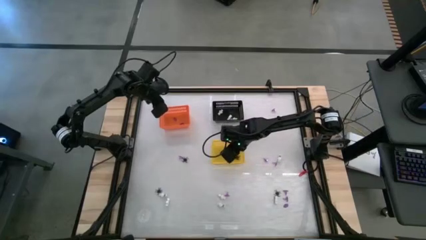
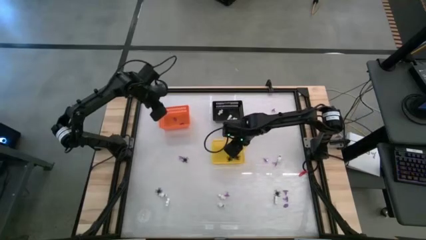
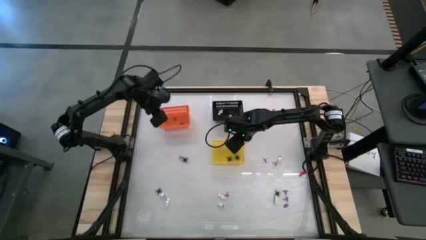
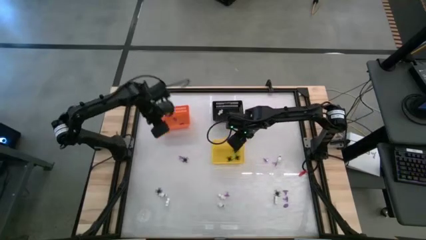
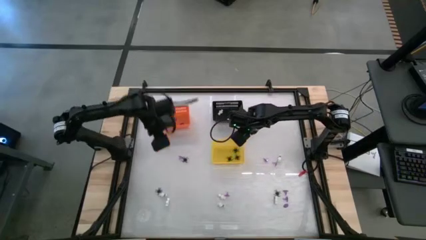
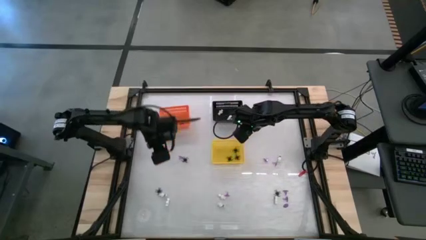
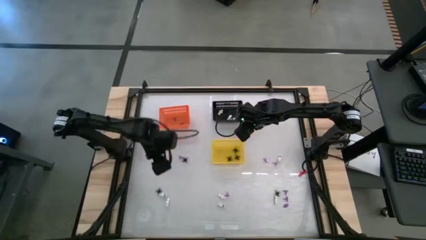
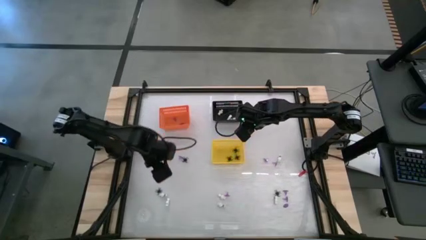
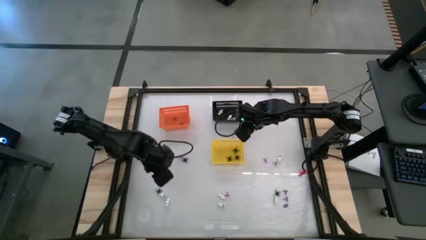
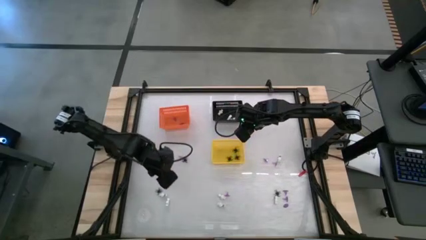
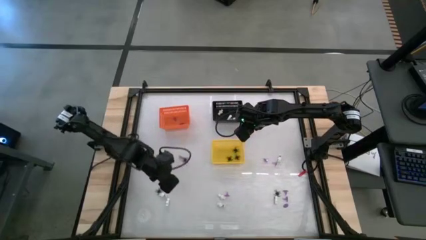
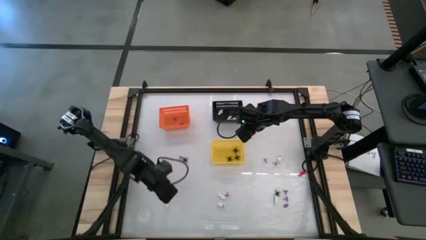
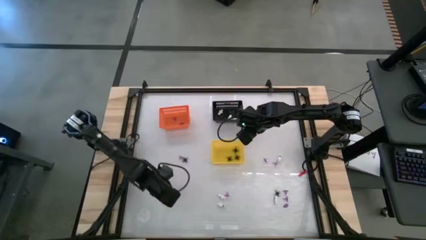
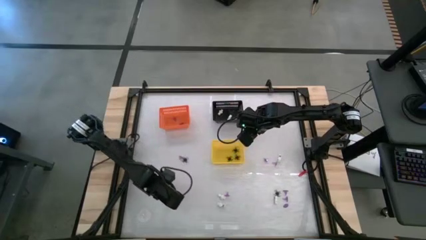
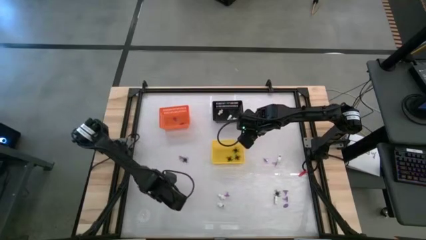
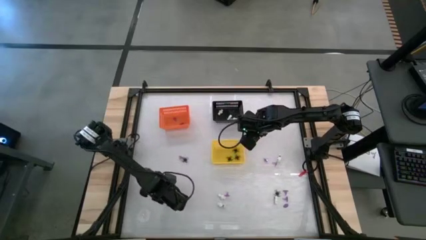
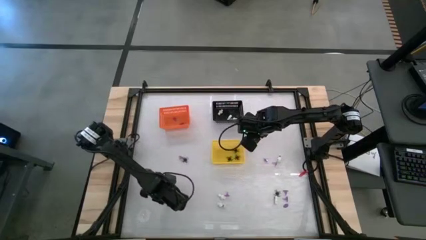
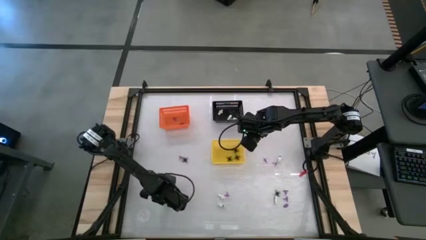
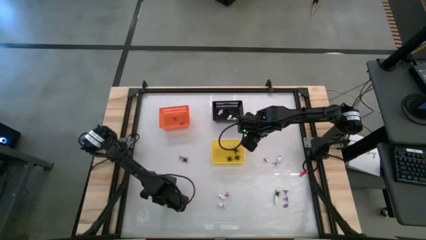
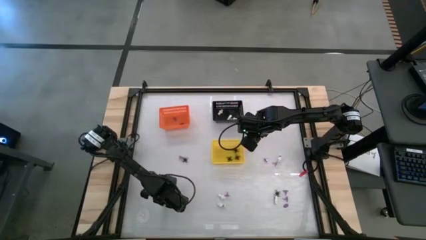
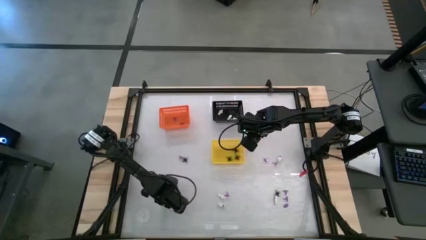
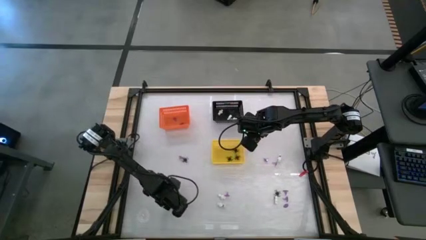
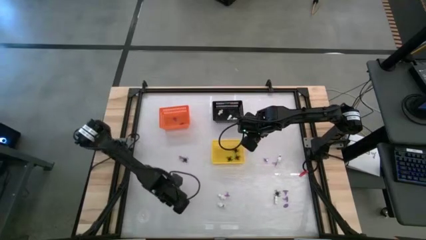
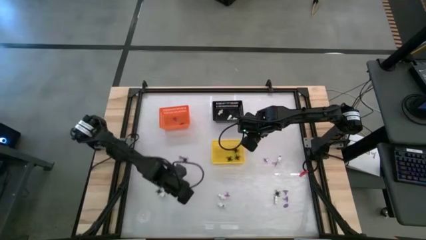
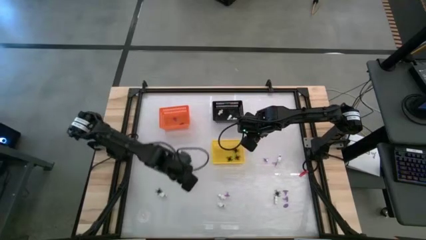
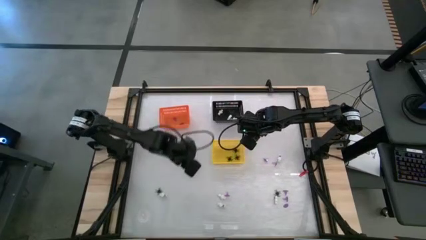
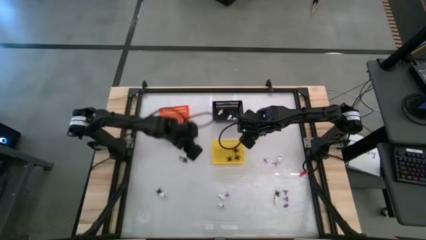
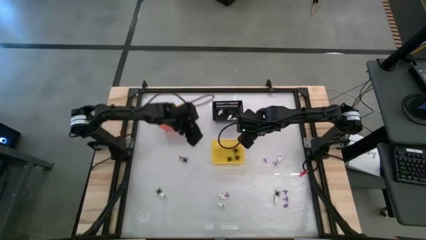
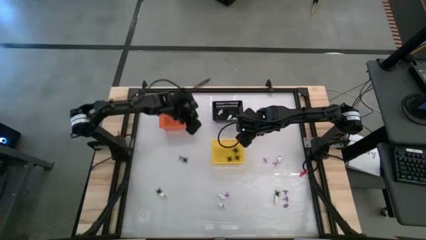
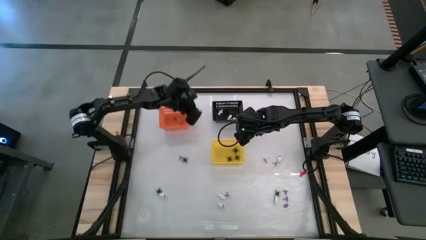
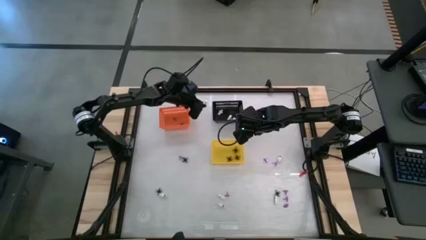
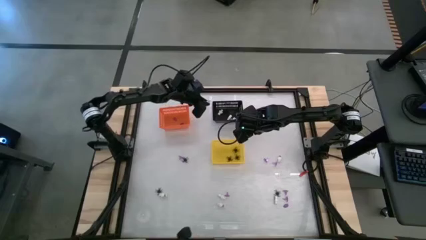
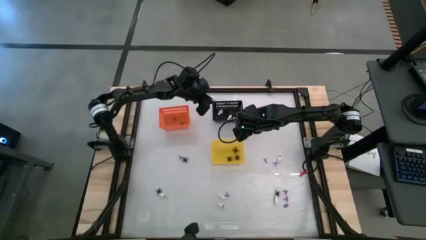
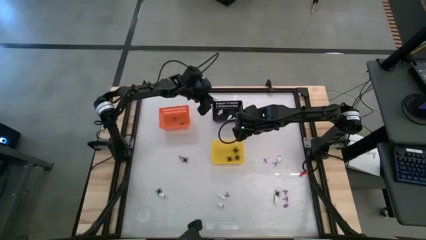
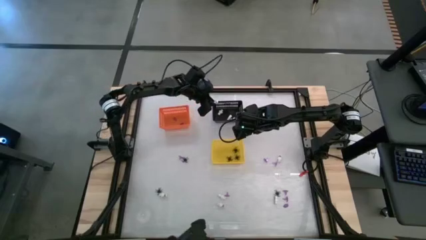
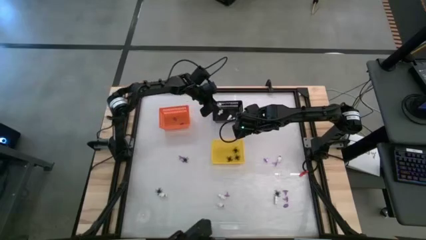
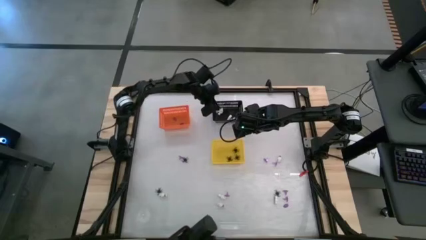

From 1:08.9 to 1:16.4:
Task: Sort Halloween decoration
Put the white skeleton toy into the black bin

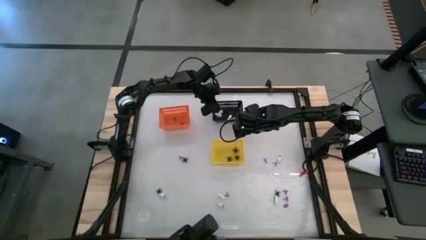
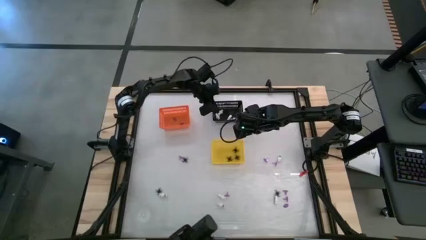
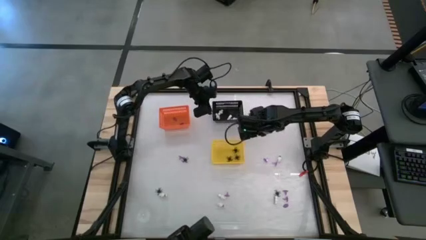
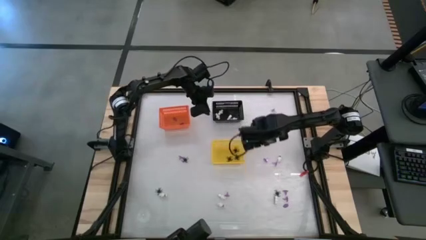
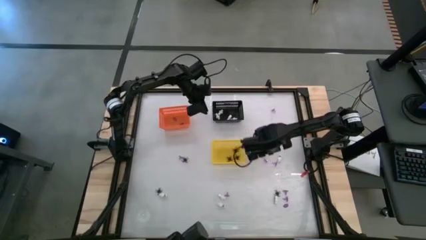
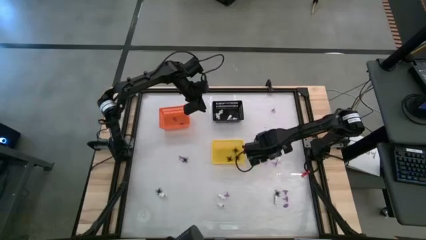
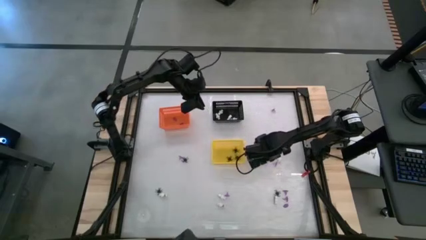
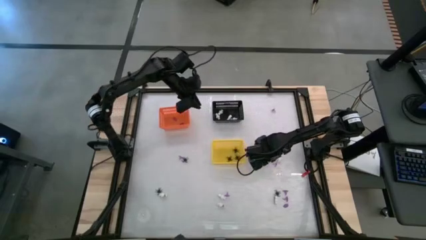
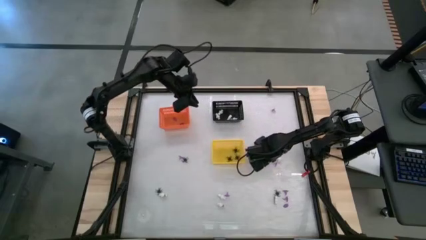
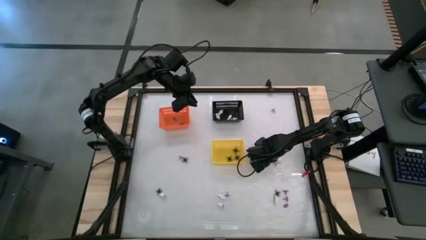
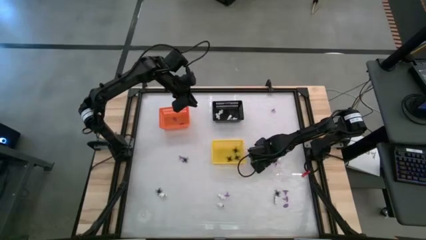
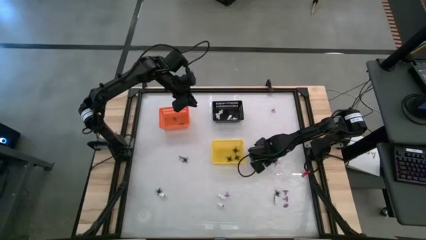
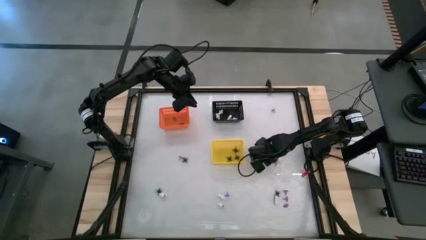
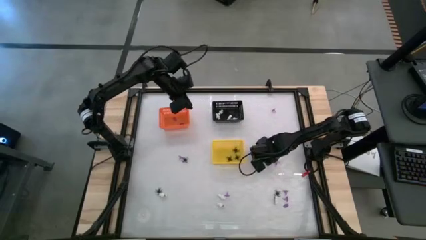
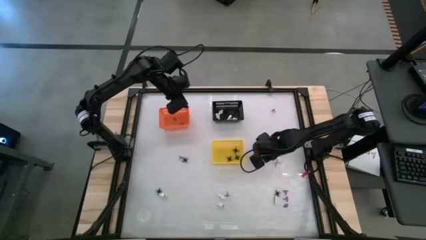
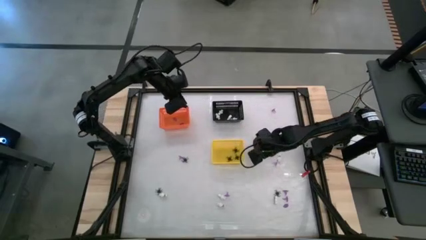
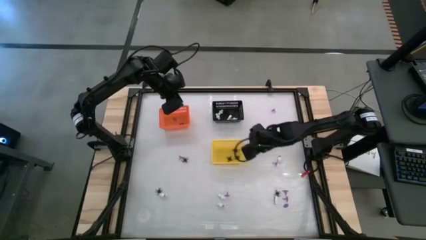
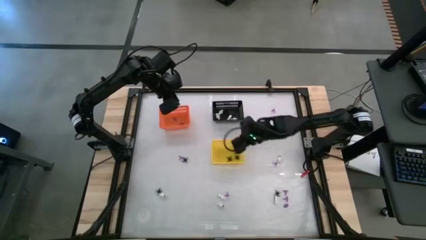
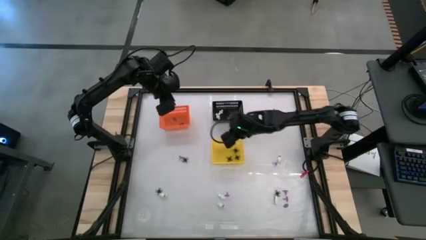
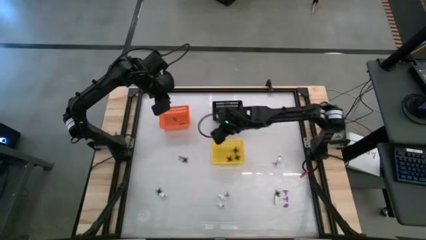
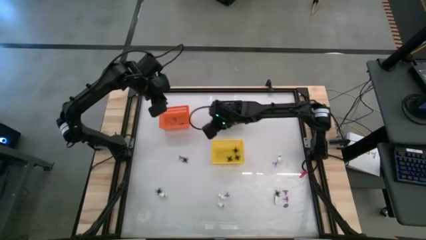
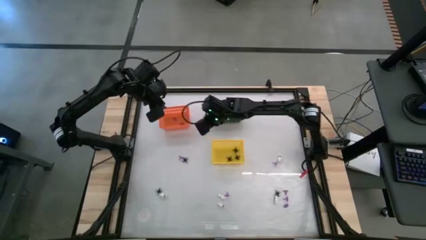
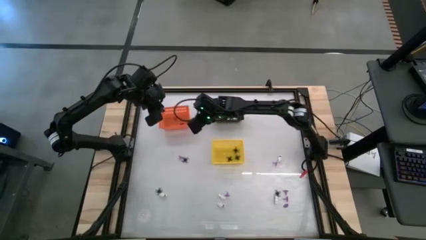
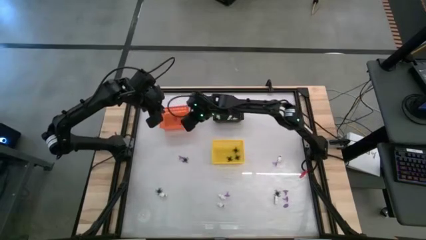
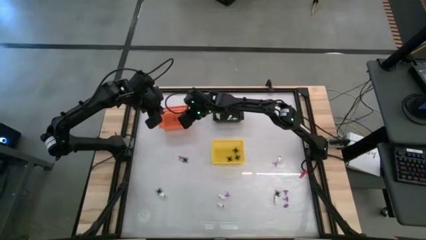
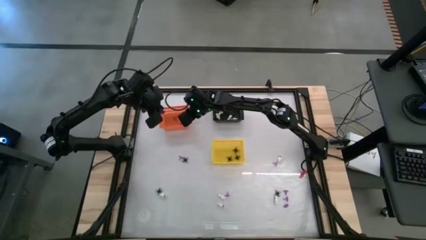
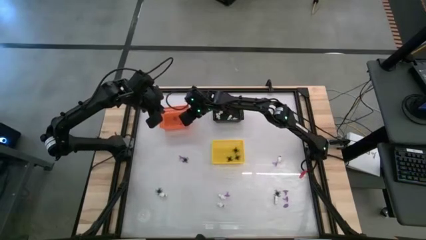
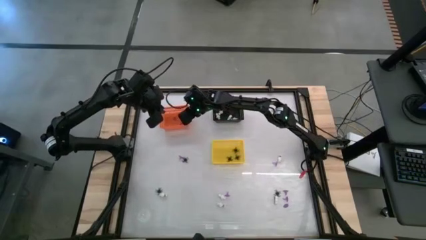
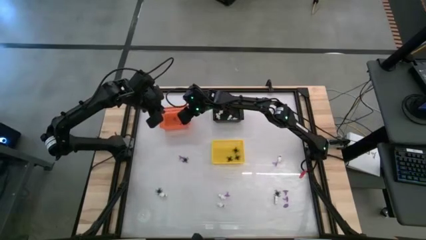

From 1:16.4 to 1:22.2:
Put the violet witch hat toy into the orange bin

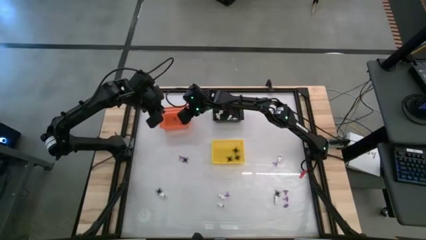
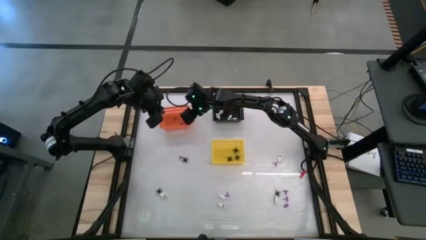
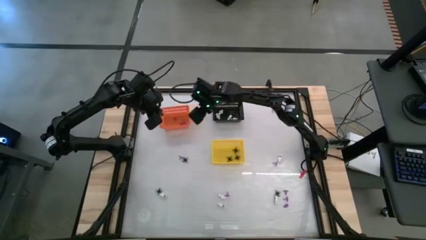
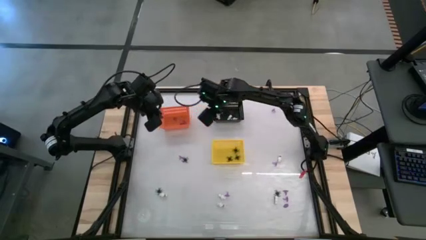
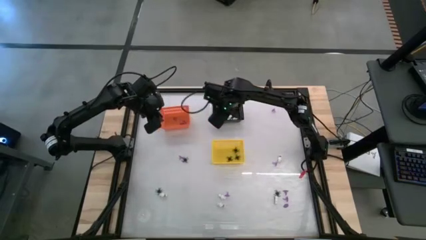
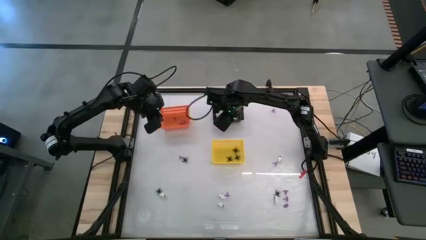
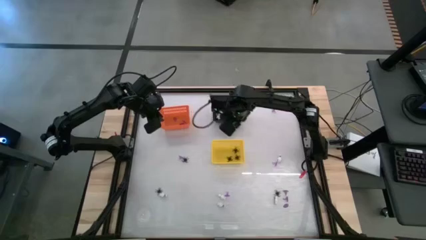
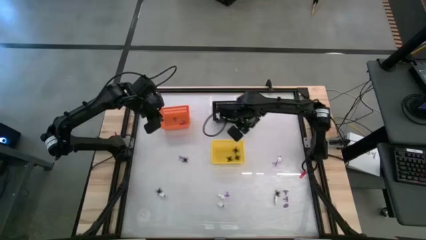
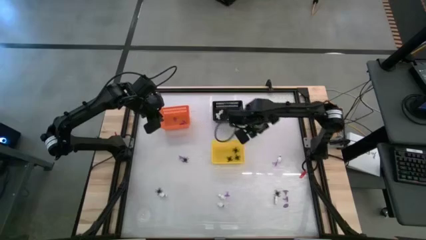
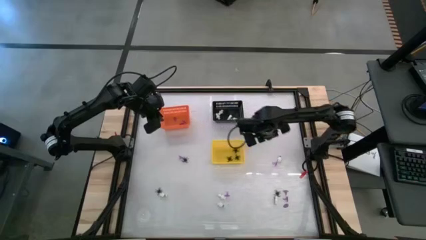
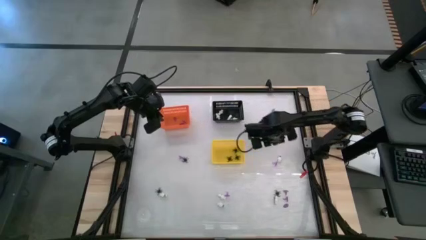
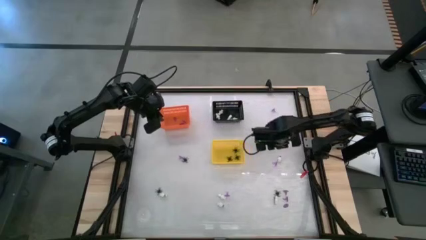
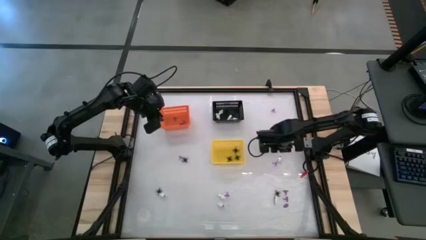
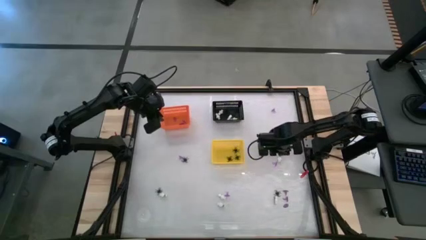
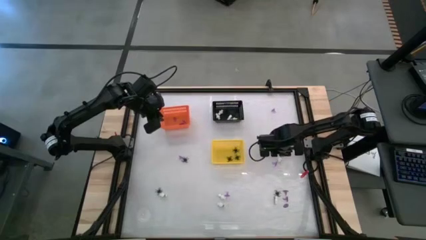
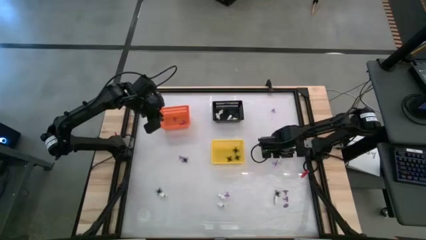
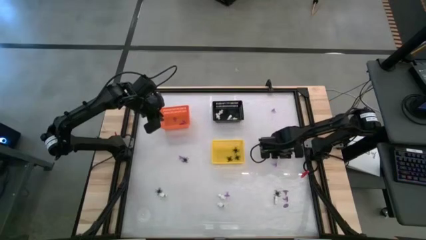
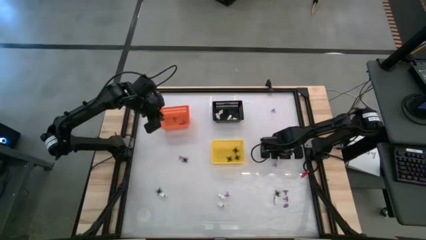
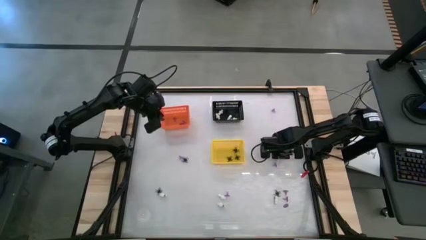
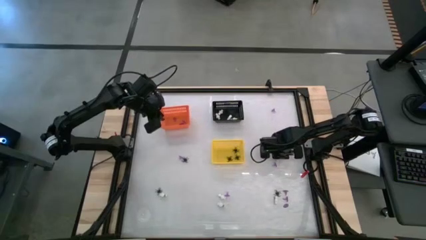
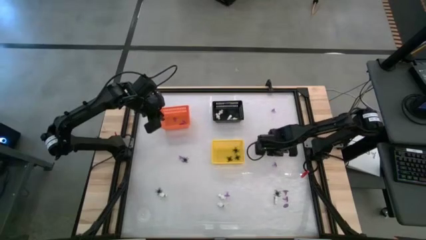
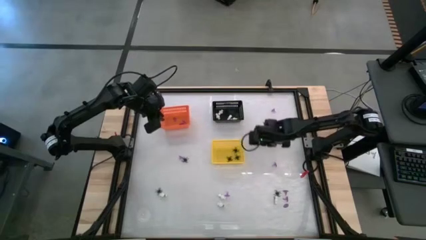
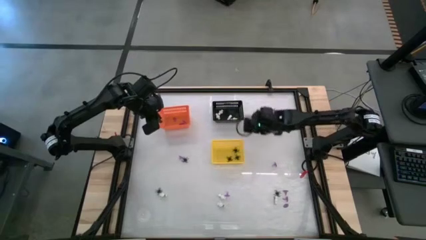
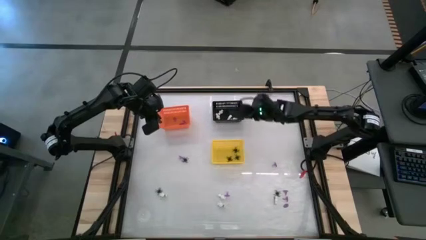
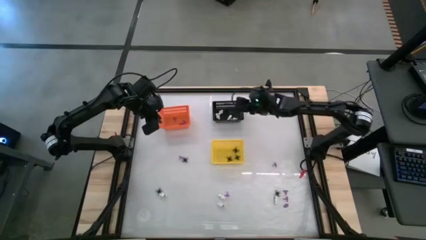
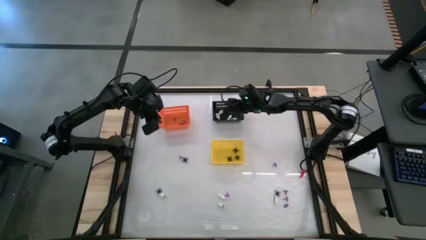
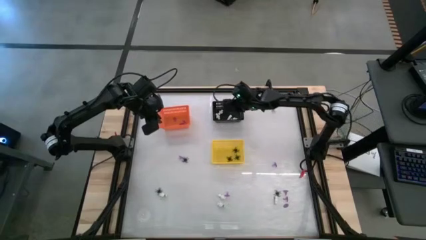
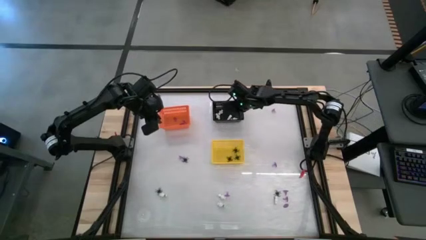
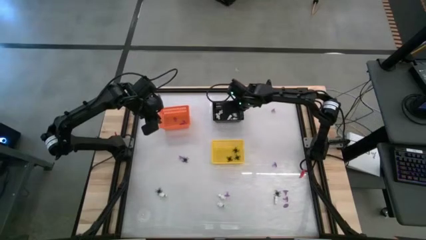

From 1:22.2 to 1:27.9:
Put the white skeleton toy into the black bin
